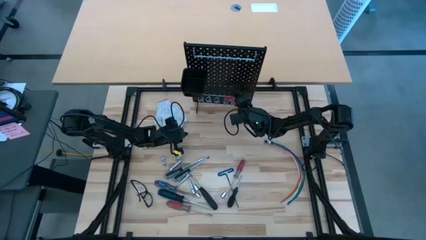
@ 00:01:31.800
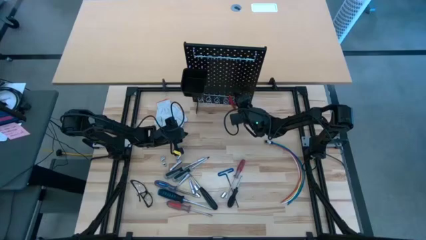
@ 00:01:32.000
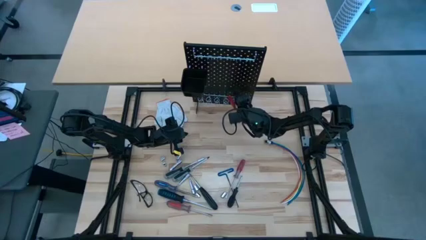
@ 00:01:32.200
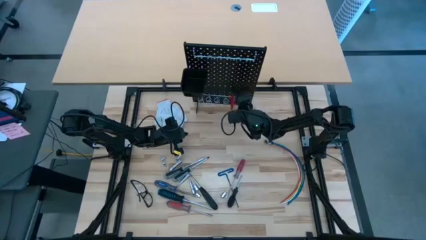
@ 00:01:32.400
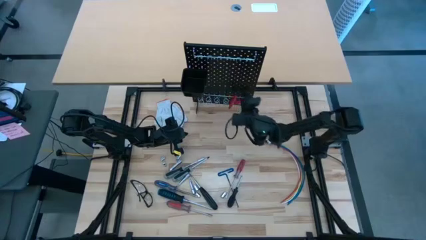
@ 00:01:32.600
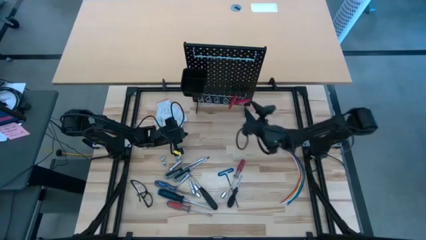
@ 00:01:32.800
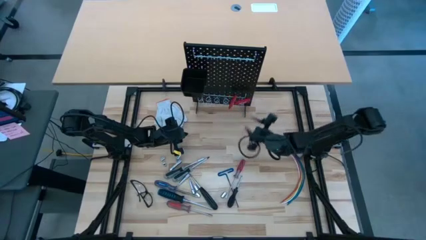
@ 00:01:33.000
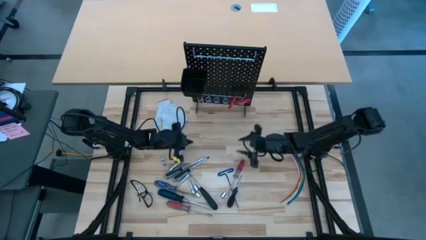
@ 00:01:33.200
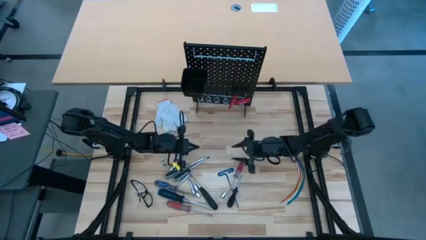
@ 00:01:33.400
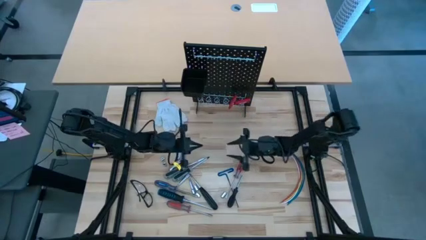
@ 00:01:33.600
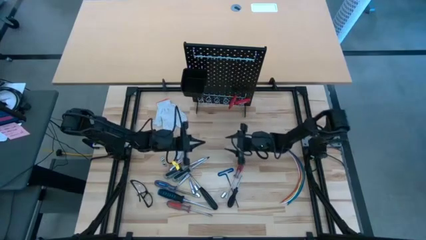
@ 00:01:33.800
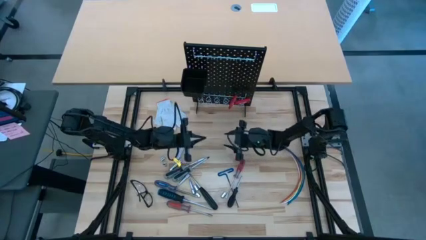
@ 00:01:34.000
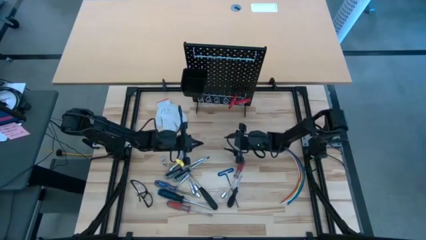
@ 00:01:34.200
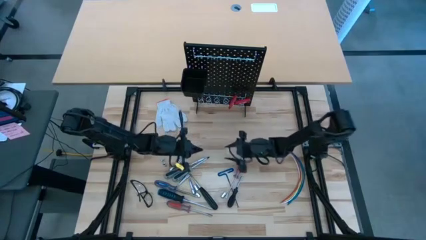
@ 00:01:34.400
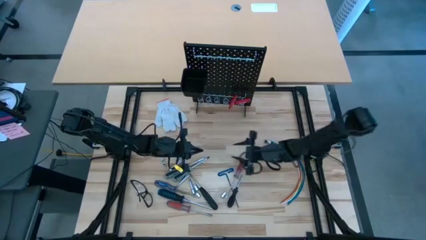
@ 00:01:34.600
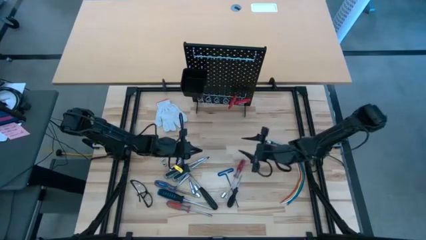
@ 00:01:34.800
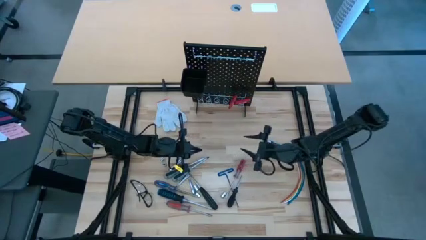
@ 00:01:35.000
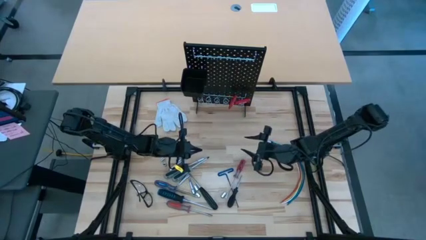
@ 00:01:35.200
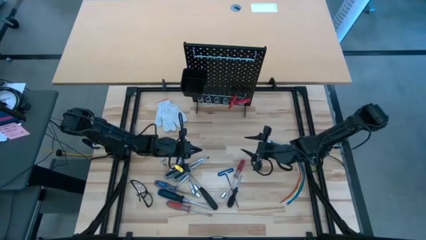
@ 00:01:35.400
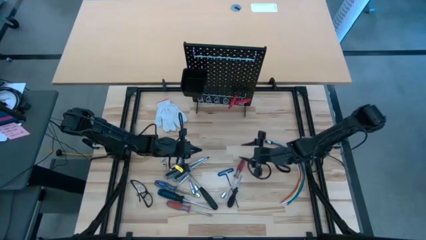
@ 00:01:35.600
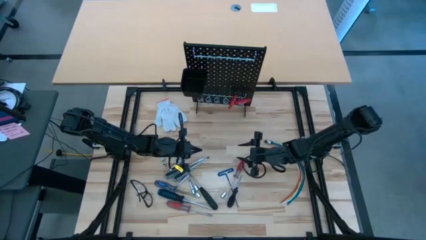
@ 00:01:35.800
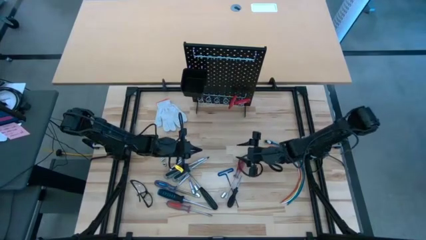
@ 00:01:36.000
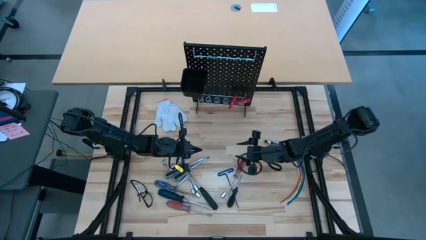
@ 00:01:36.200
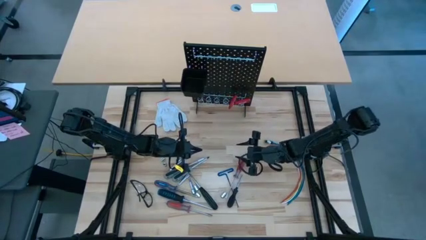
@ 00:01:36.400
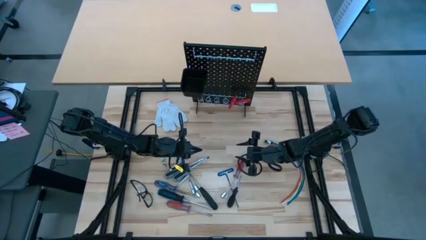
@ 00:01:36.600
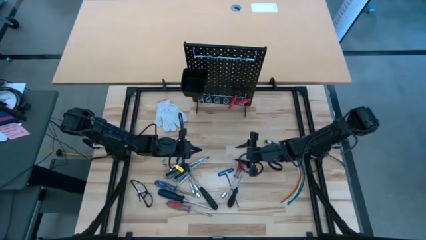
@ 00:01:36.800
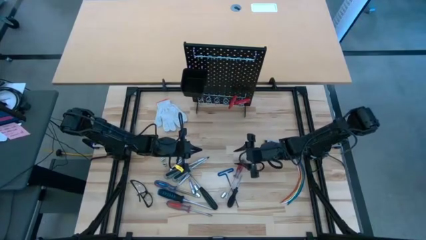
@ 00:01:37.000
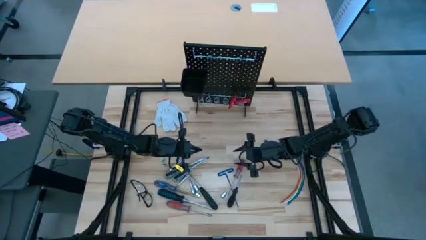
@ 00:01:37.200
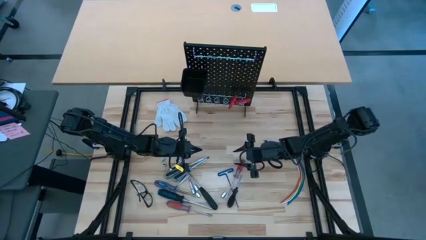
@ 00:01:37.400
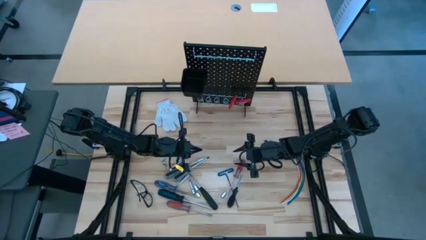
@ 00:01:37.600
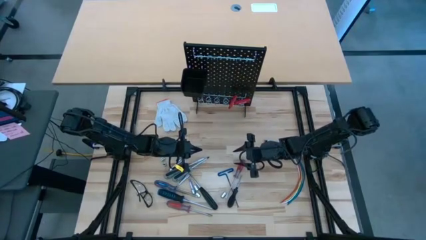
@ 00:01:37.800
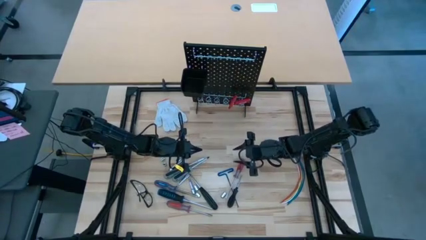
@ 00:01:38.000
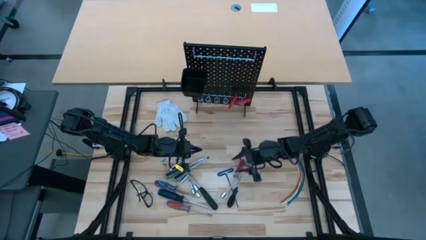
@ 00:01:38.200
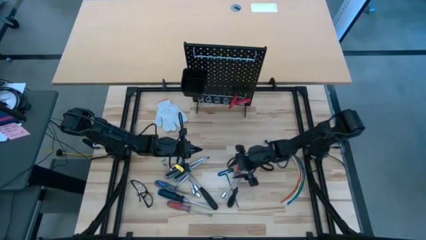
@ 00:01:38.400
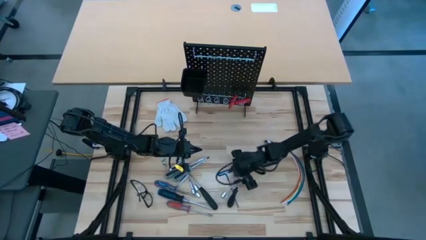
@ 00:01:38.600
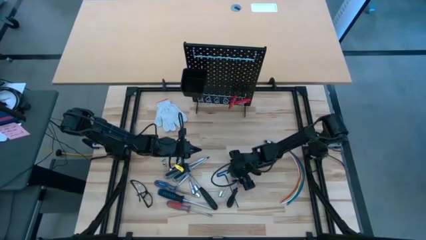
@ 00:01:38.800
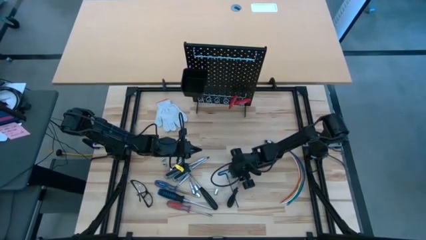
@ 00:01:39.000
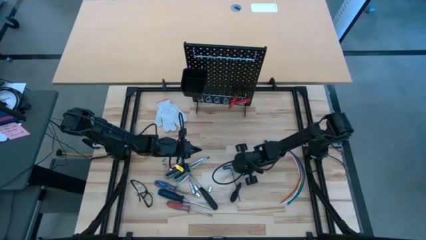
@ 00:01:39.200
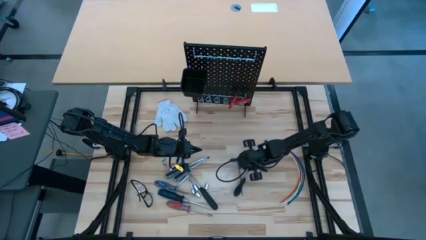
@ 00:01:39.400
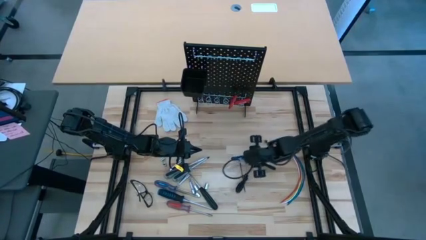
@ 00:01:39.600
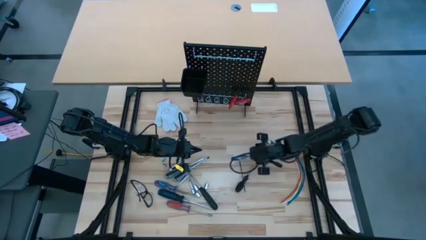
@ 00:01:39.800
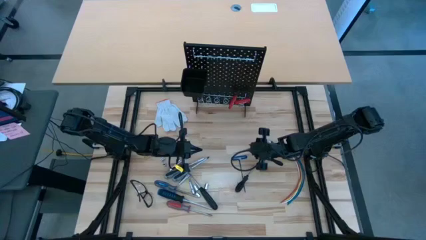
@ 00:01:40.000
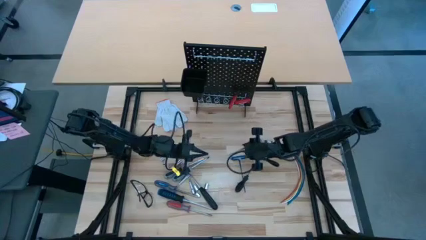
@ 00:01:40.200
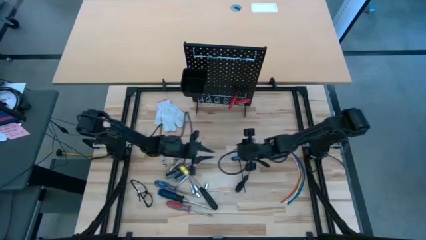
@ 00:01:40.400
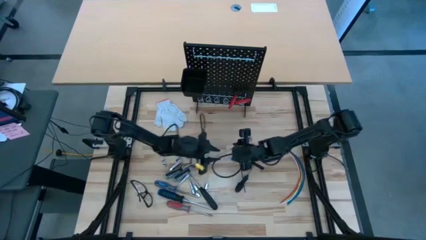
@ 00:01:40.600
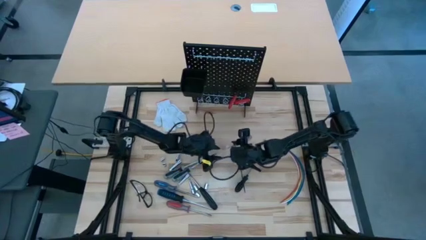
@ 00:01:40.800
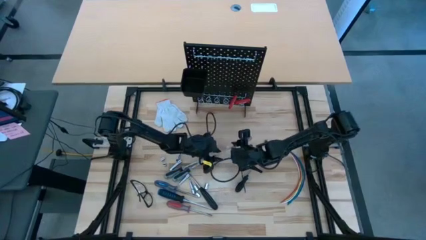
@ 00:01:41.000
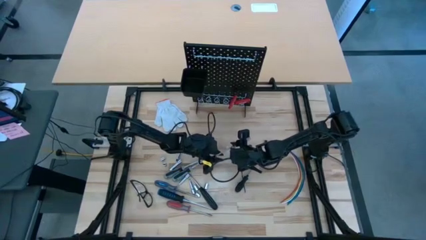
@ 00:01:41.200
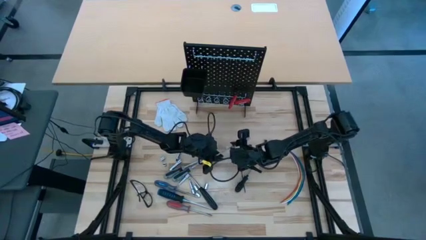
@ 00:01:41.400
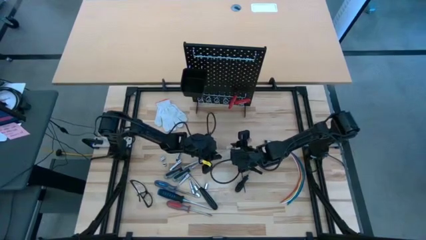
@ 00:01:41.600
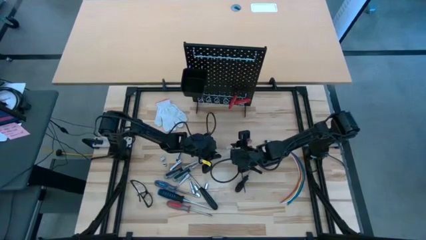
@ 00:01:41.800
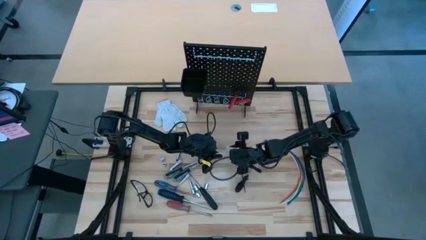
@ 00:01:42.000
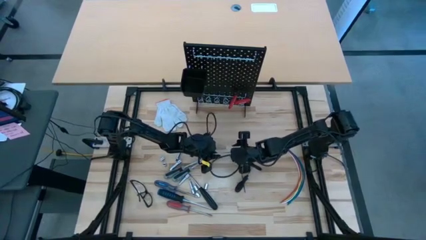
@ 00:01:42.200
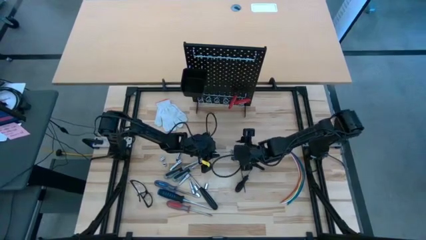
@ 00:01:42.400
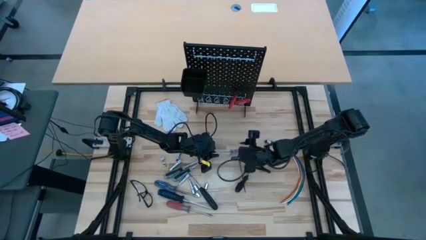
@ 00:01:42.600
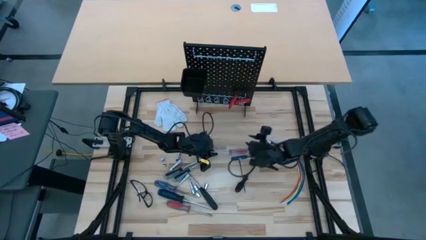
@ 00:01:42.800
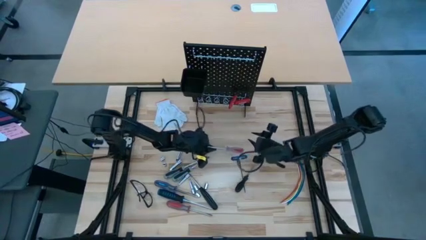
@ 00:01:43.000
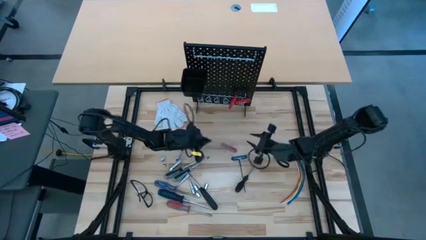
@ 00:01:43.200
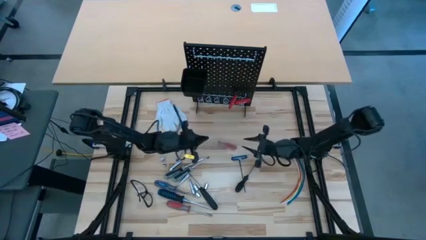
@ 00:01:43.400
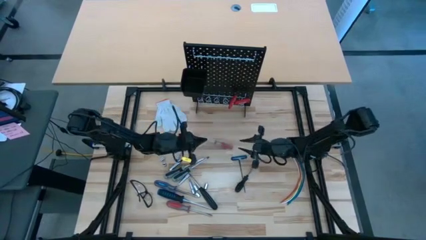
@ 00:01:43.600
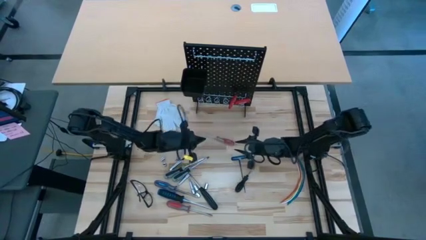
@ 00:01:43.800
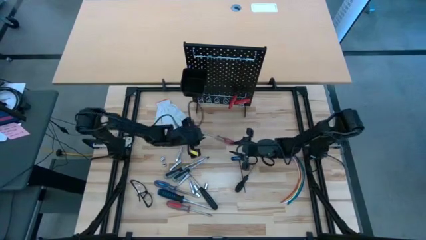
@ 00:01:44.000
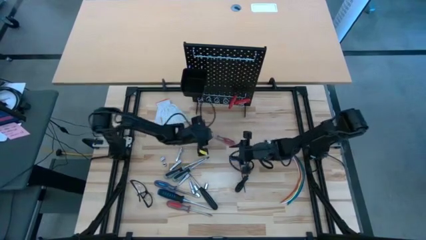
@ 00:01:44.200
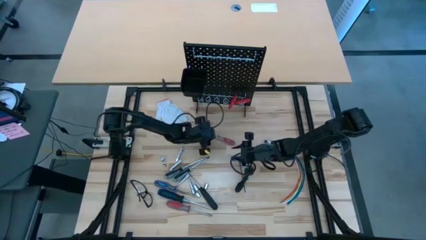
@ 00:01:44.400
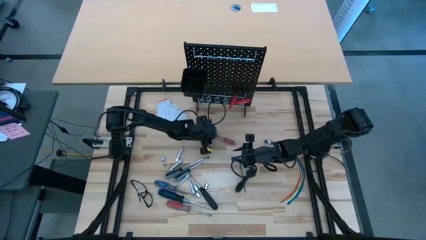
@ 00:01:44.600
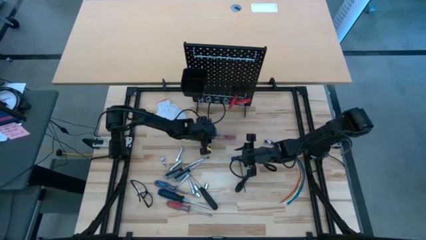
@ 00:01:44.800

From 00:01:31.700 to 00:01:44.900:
Task: Hang tools onto peg board
Hang the red transparent screwdriver on the pegboard

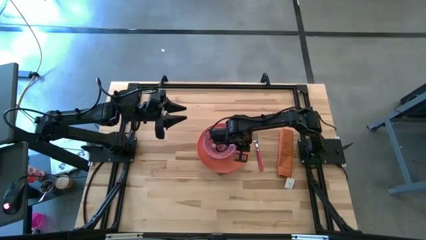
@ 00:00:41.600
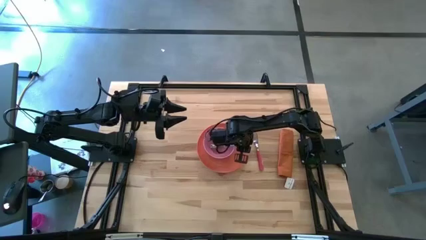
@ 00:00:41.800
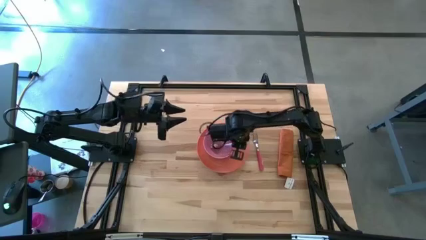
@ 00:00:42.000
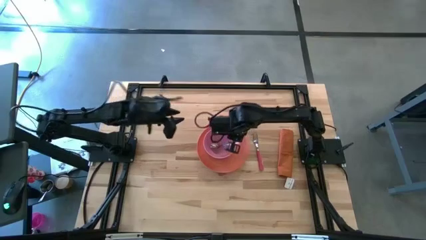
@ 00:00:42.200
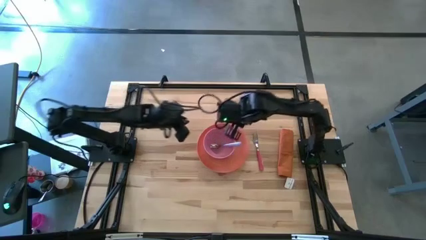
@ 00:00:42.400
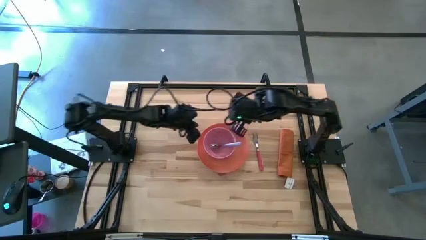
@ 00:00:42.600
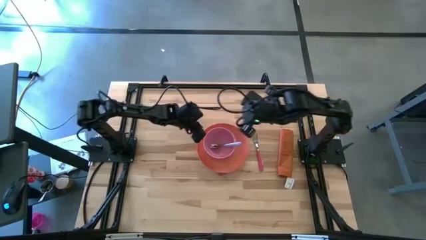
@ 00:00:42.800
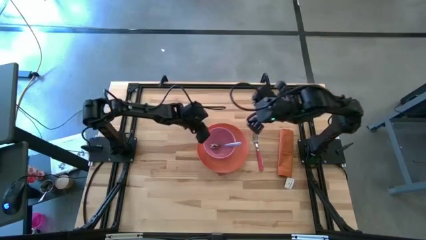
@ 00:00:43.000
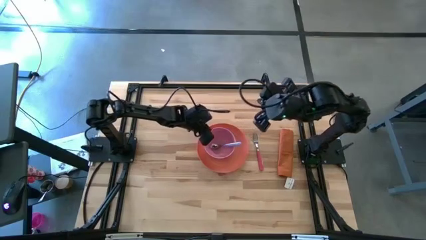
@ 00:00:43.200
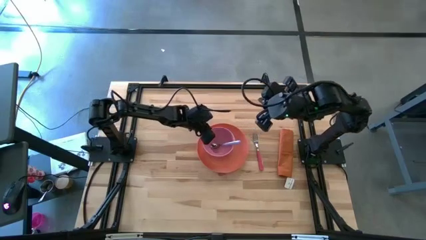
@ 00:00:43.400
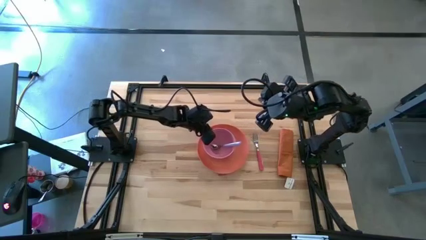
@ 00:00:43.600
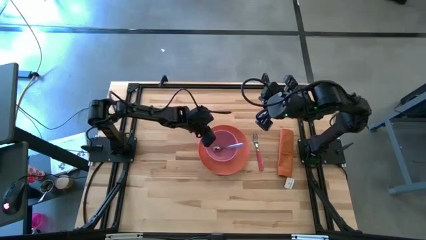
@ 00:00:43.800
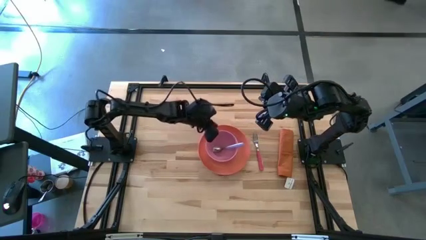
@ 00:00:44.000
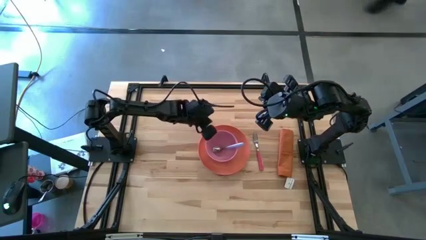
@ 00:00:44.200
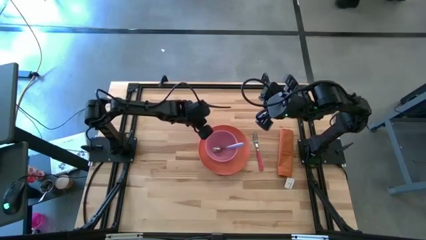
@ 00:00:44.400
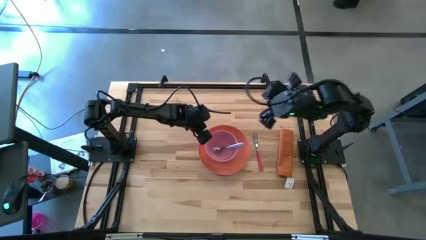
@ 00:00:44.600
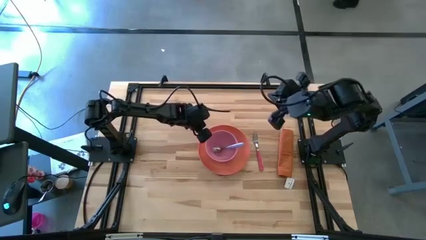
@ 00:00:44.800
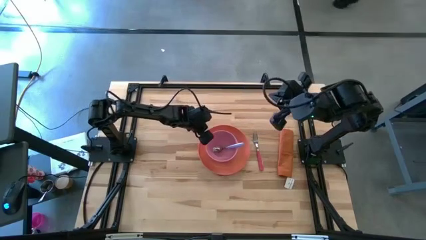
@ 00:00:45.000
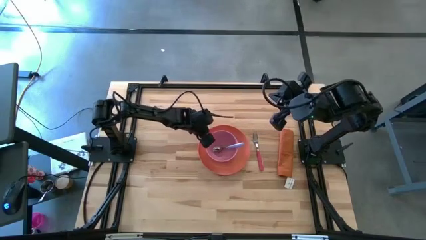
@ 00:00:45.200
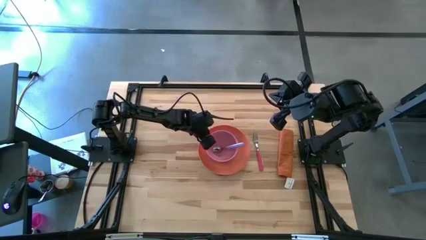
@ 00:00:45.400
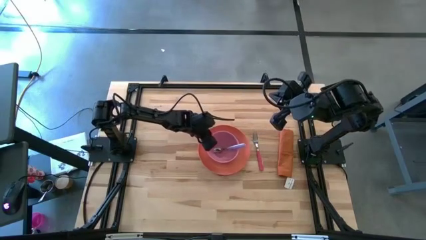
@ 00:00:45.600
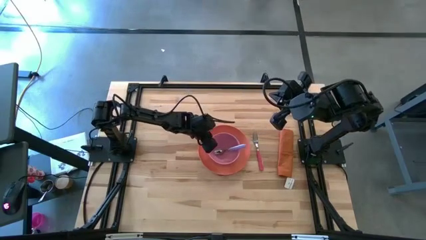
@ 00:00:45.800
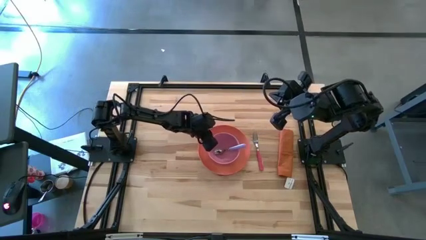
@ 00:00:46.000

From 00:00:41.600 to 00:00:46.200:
Task: Set table place
Adjust the bowl on the plate
